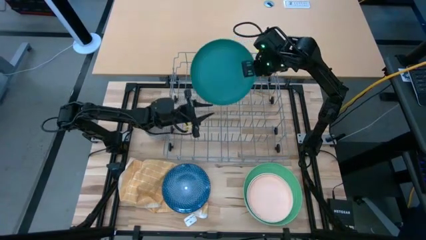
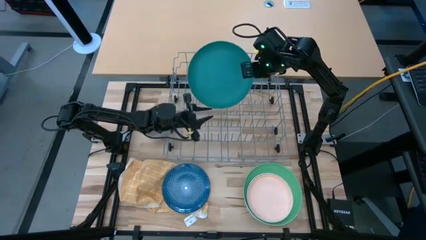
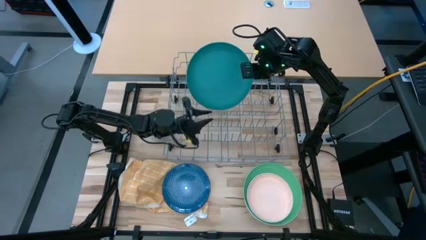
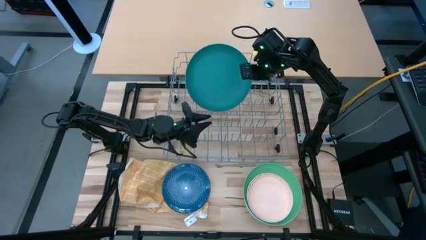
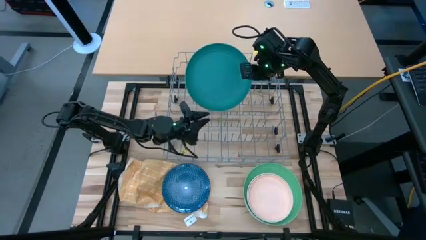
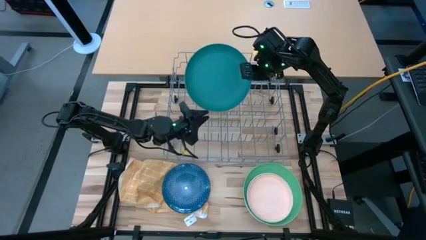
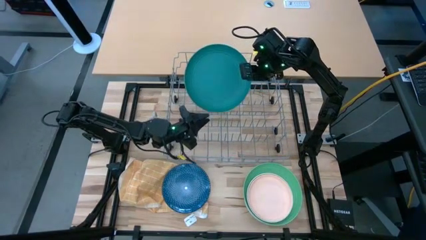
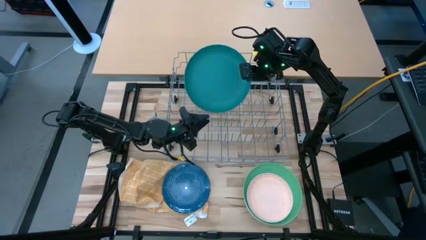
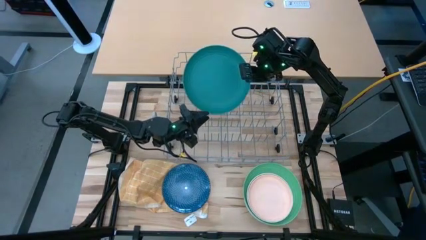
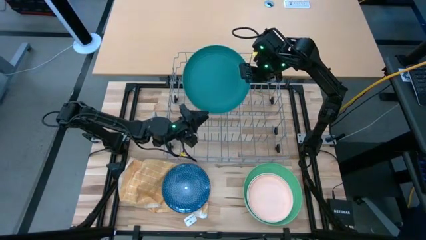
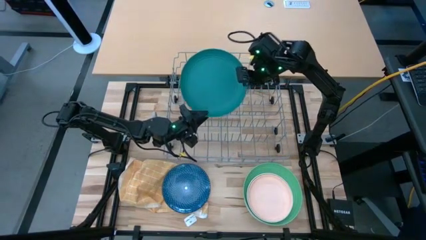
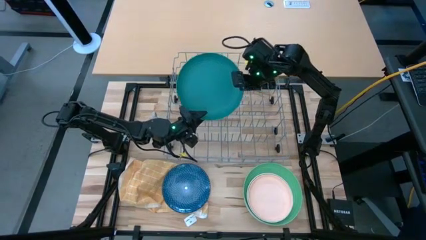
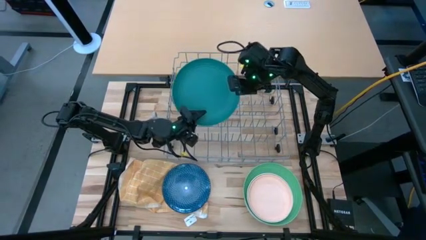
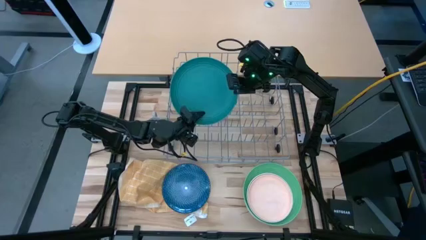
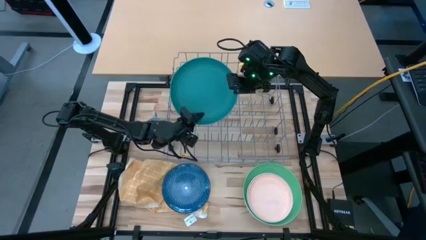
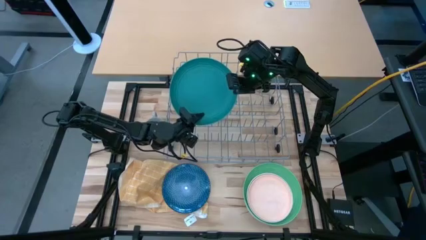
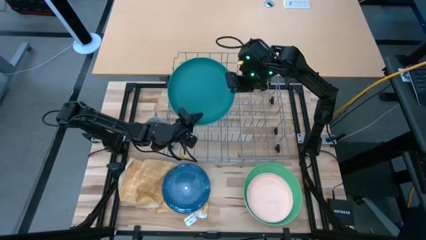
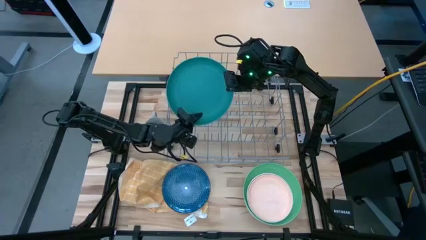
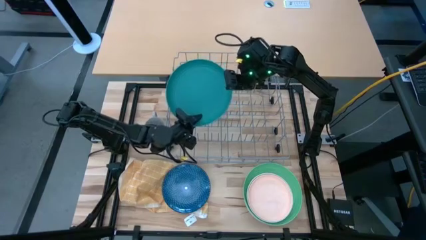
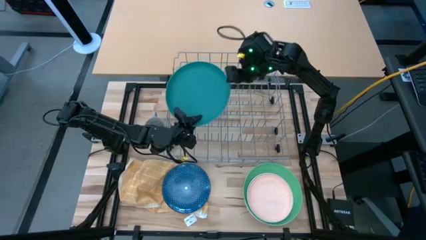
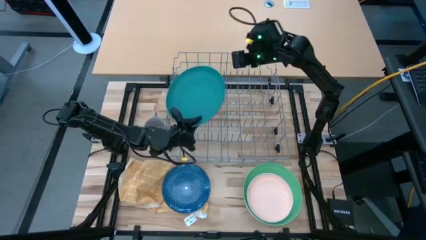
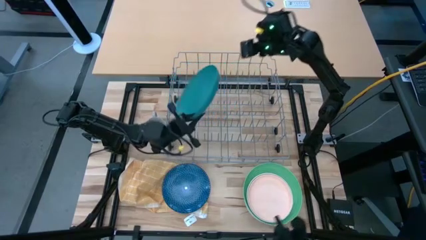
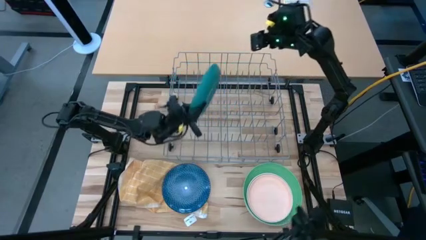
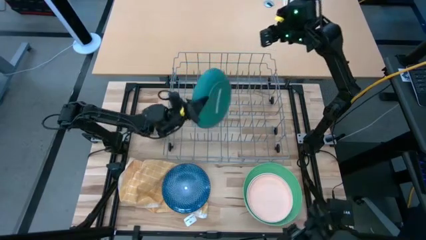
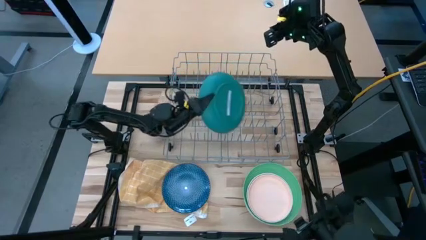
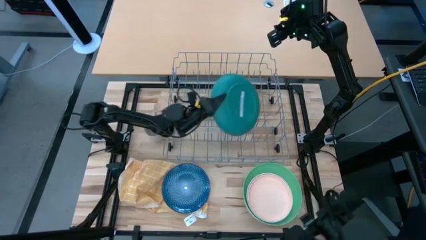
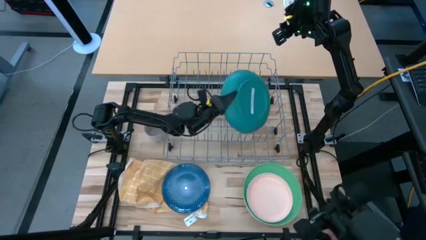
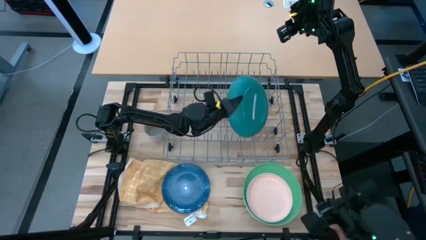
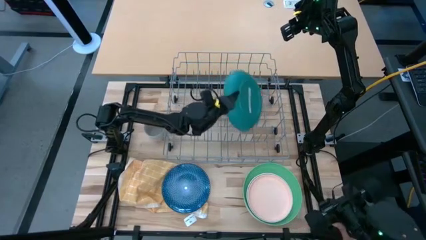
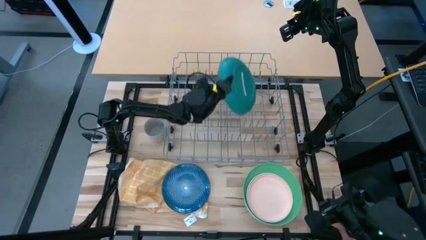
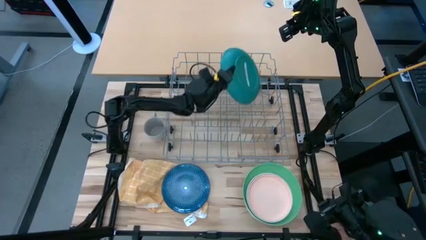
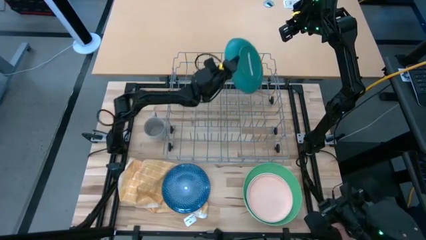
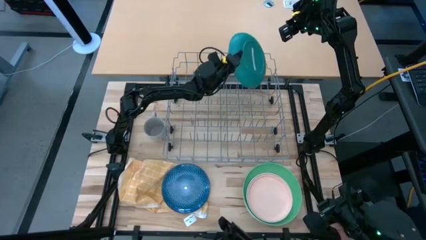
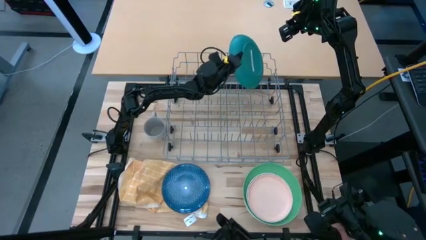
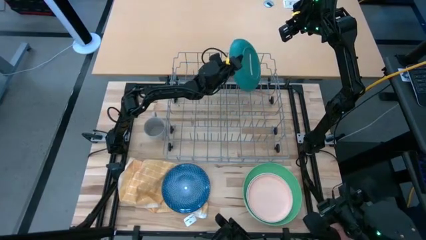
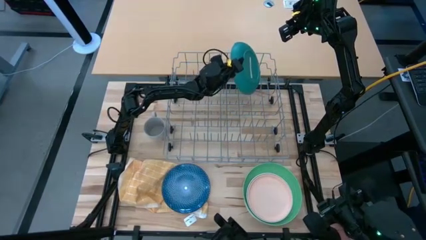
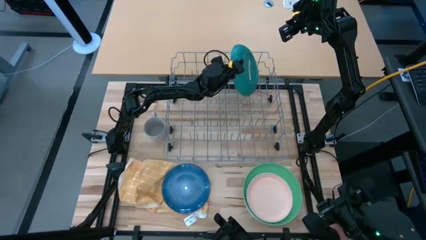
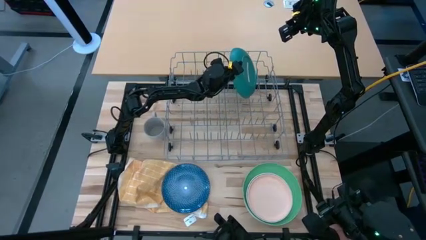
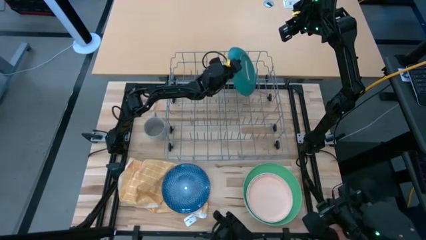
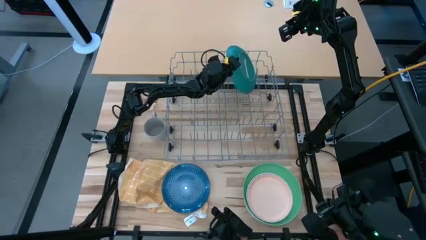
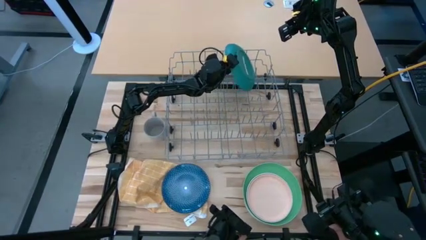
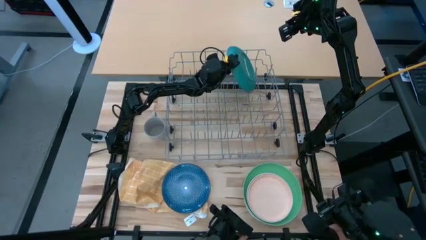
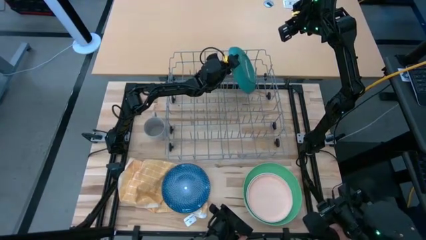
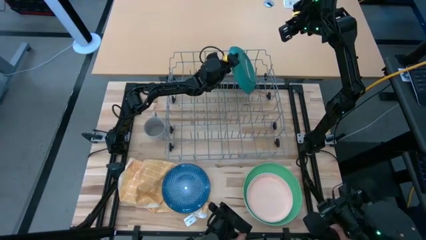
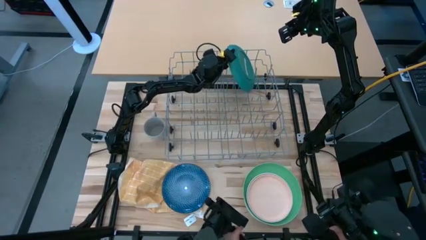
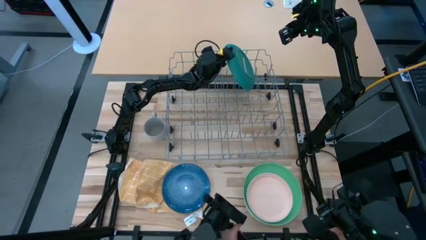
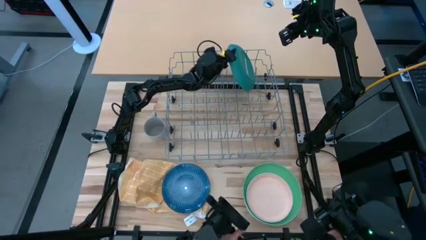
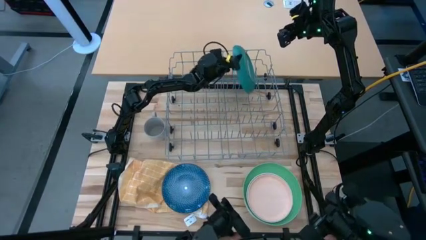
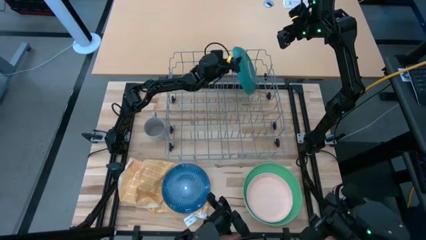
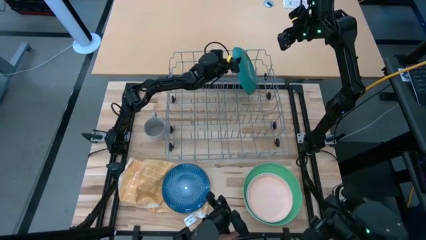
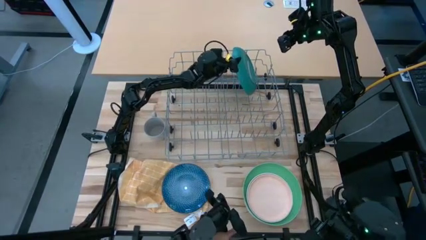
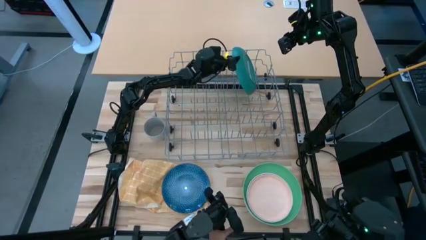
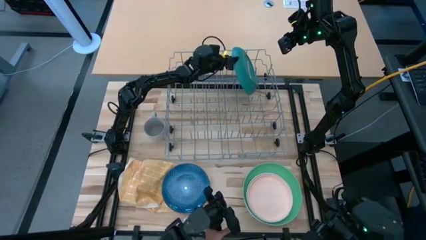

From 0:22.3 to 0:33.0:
Task: Sort dishes
Put the green plate in the dish rack
